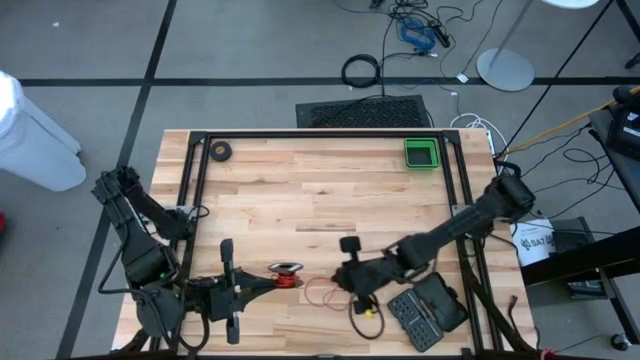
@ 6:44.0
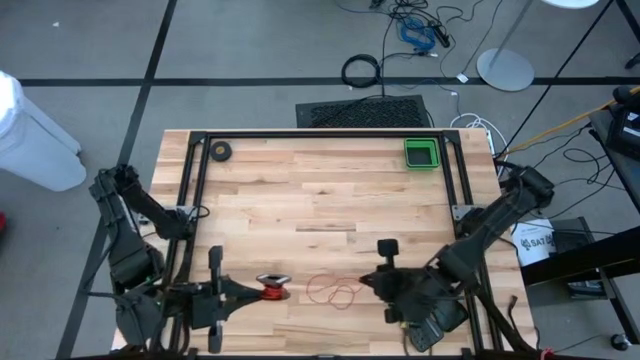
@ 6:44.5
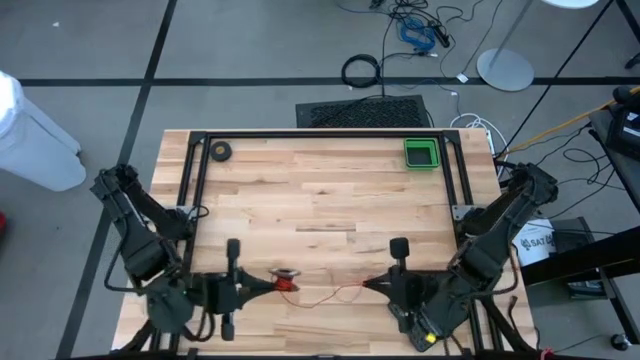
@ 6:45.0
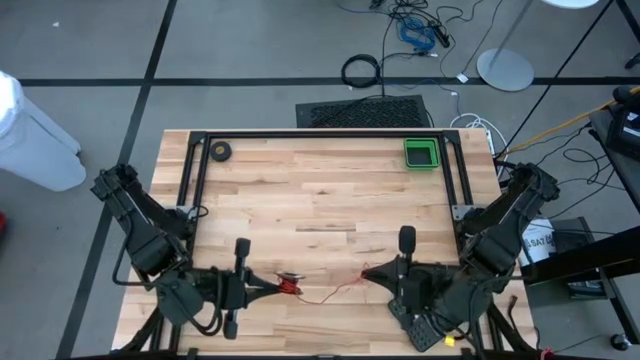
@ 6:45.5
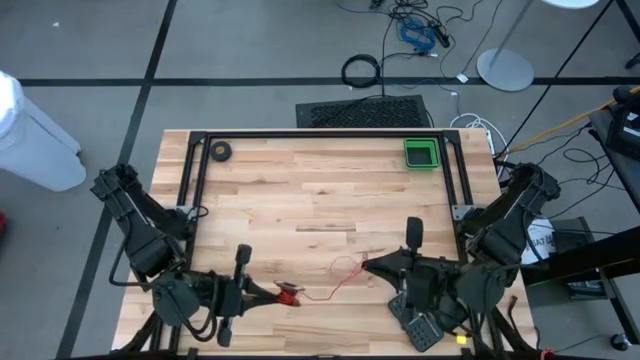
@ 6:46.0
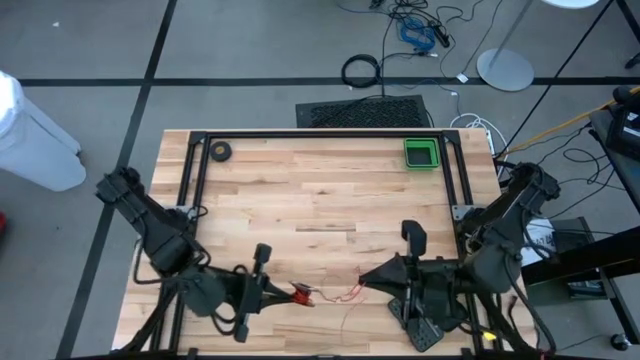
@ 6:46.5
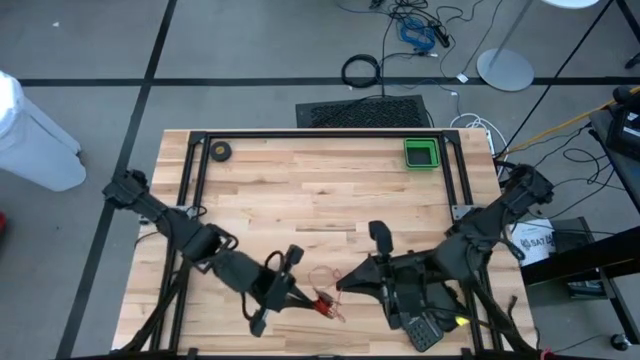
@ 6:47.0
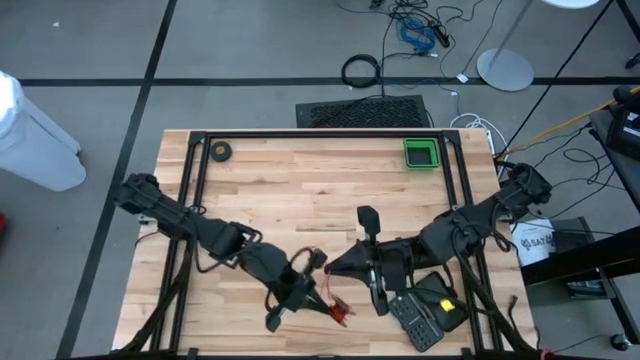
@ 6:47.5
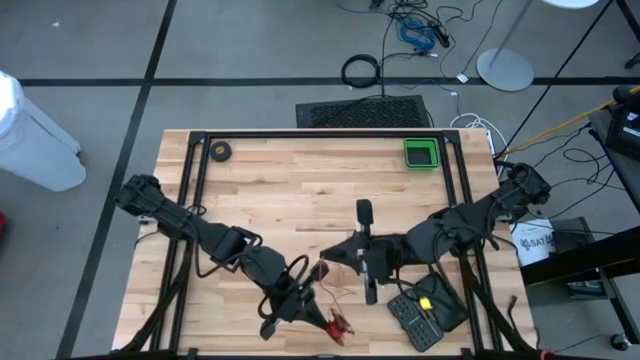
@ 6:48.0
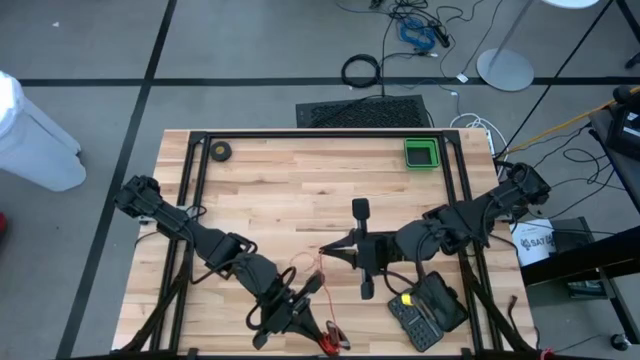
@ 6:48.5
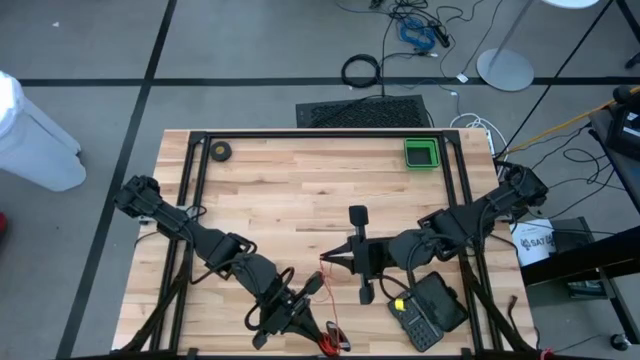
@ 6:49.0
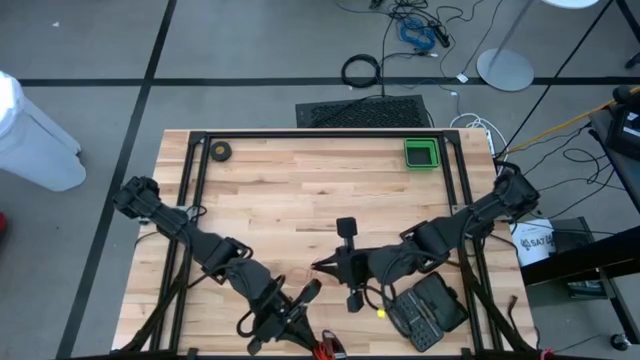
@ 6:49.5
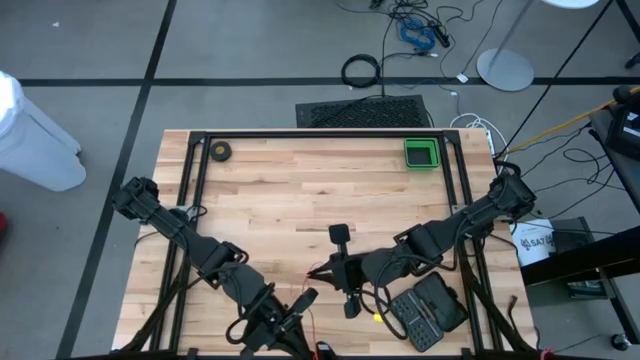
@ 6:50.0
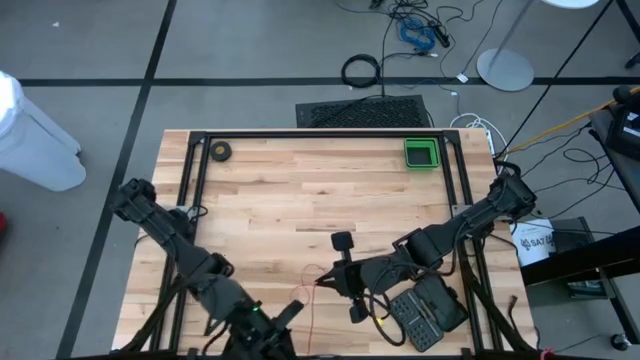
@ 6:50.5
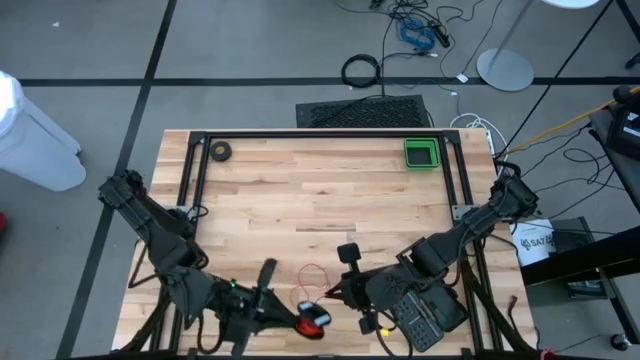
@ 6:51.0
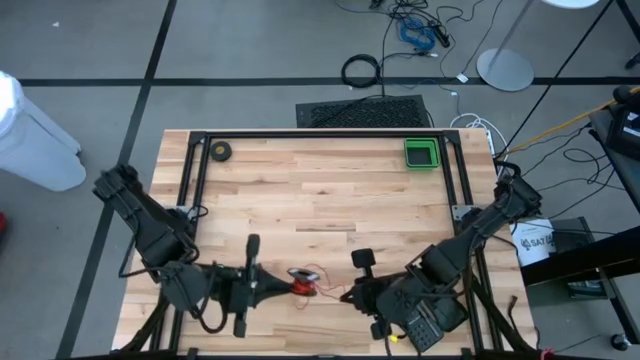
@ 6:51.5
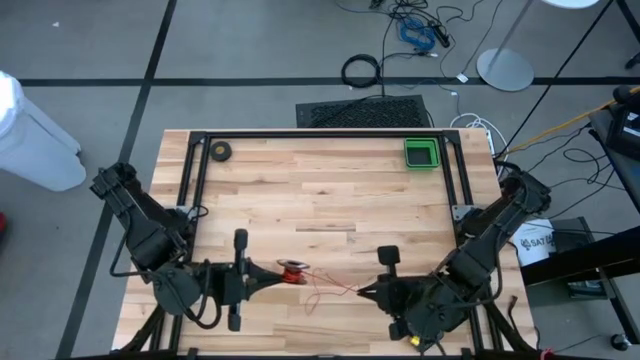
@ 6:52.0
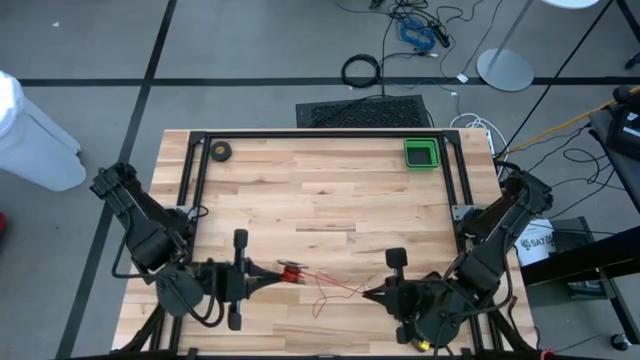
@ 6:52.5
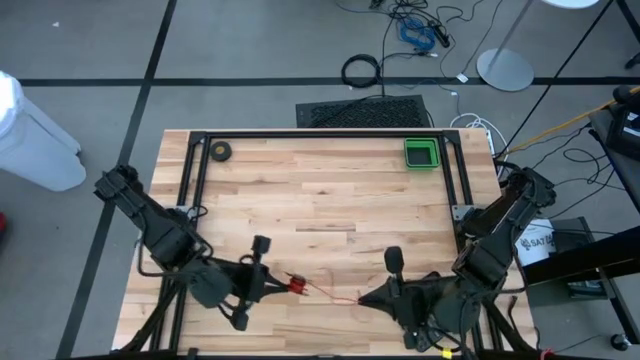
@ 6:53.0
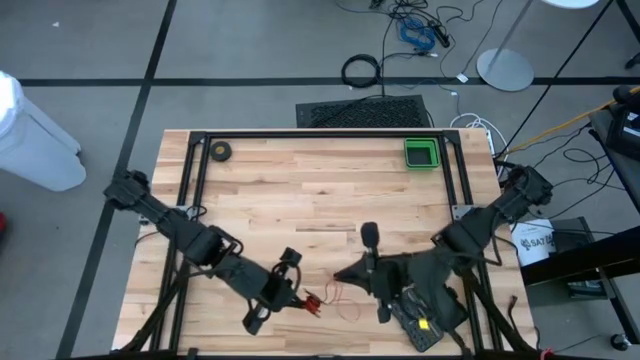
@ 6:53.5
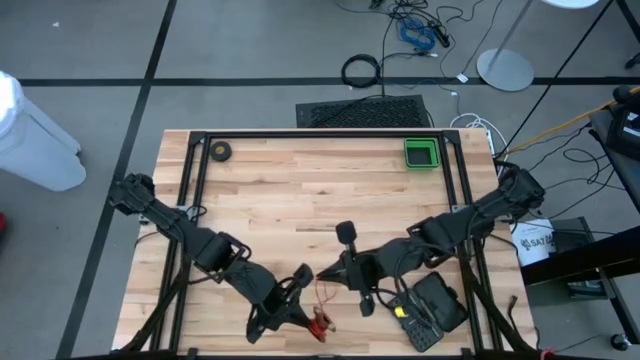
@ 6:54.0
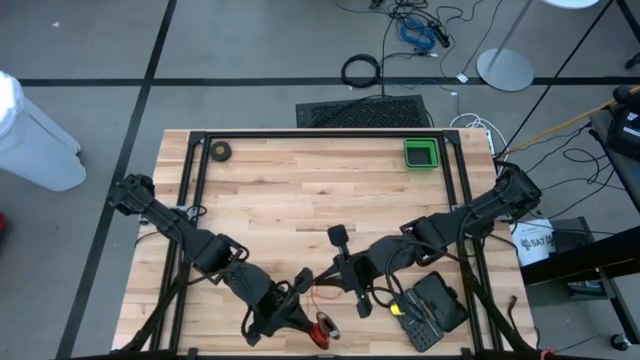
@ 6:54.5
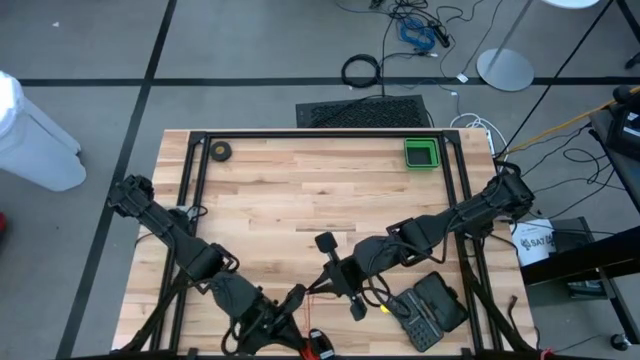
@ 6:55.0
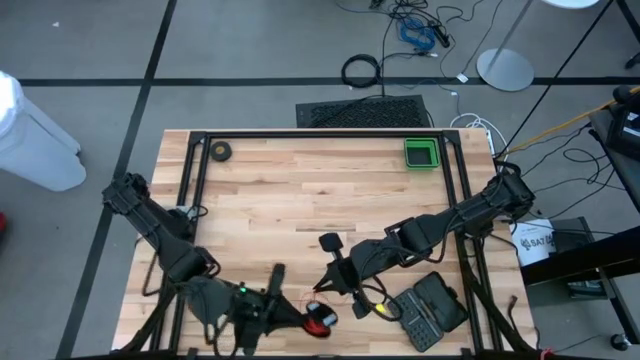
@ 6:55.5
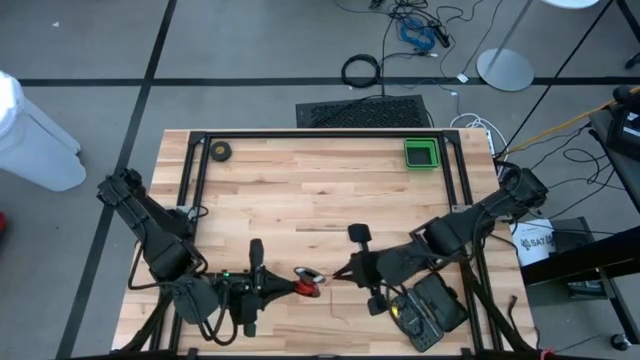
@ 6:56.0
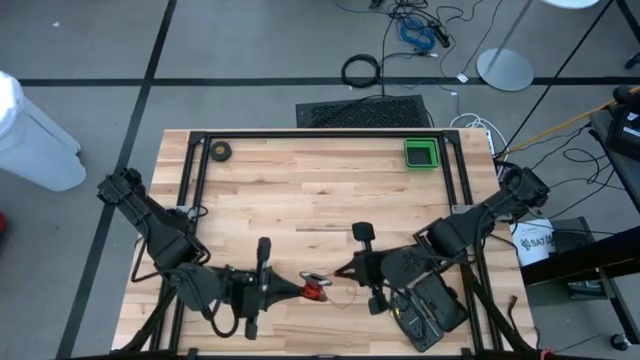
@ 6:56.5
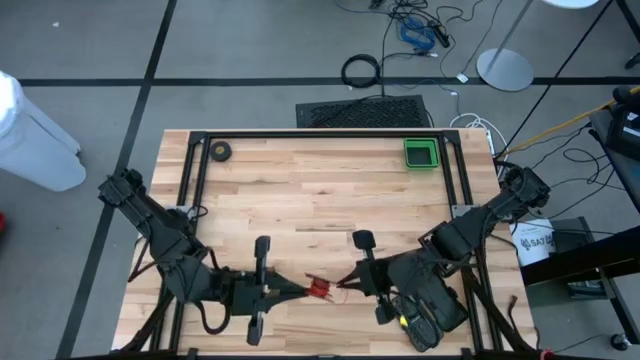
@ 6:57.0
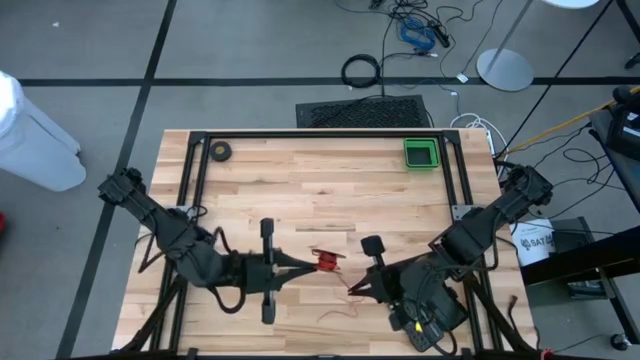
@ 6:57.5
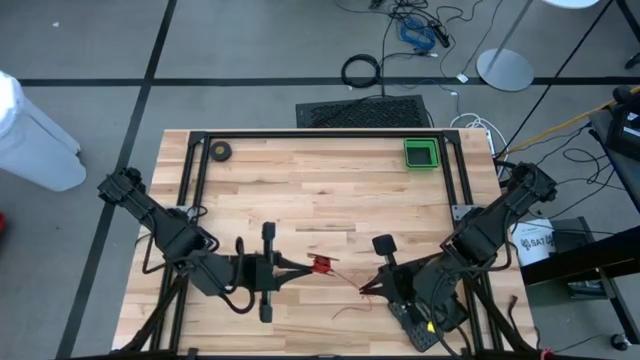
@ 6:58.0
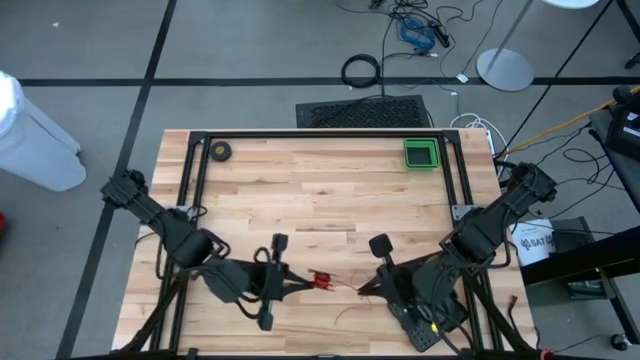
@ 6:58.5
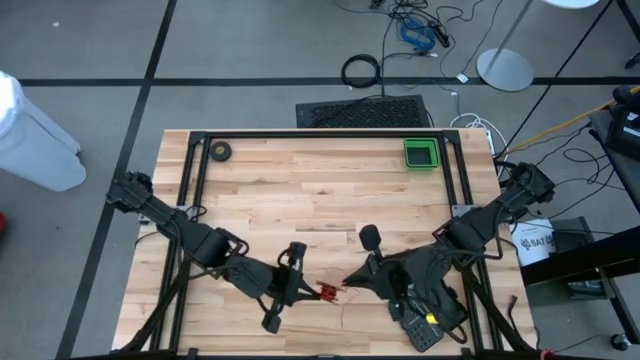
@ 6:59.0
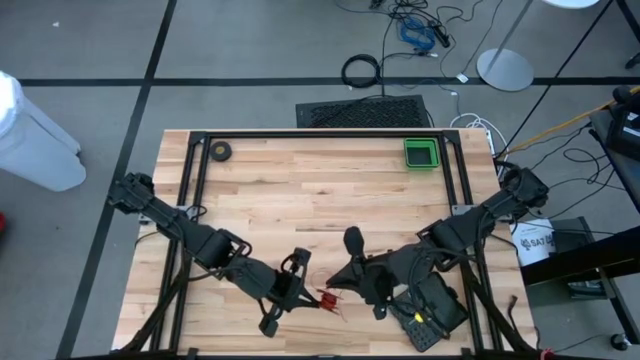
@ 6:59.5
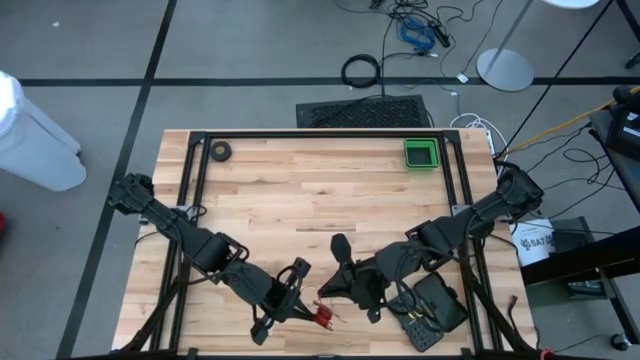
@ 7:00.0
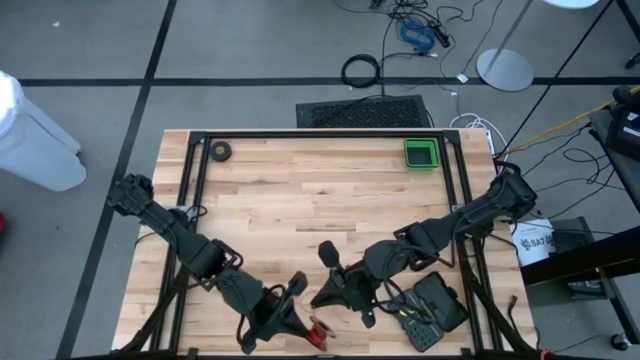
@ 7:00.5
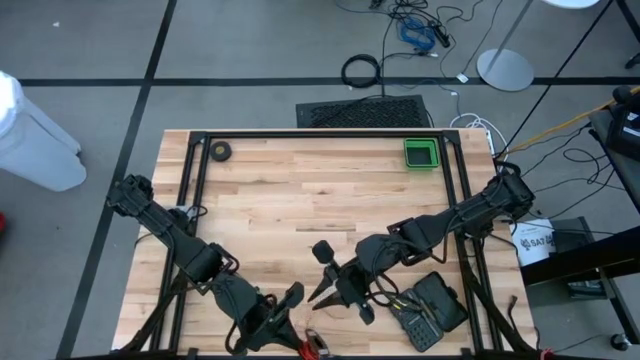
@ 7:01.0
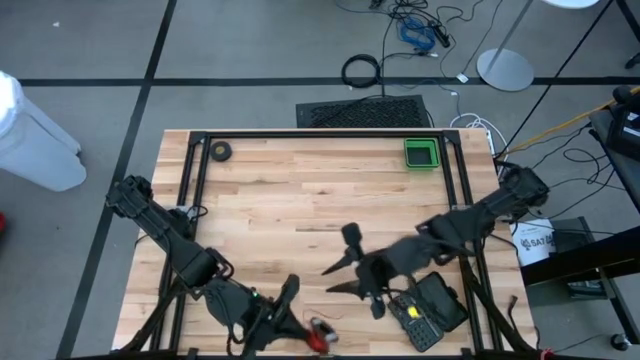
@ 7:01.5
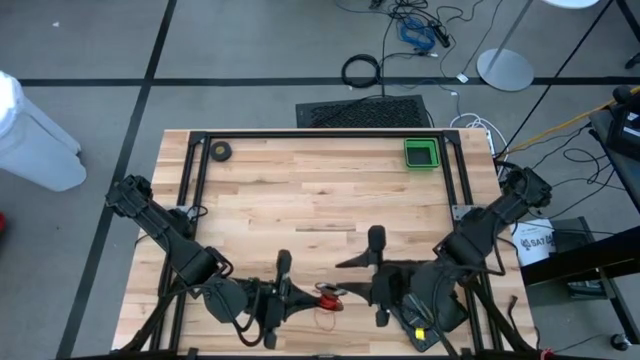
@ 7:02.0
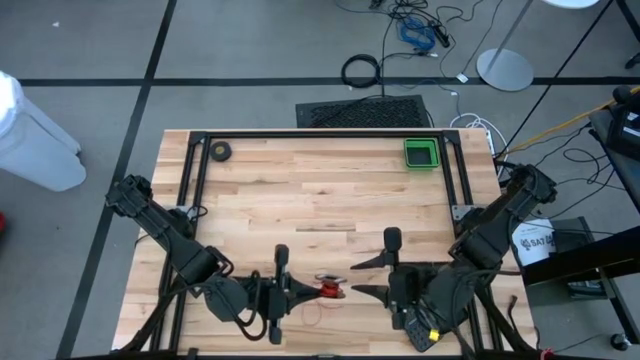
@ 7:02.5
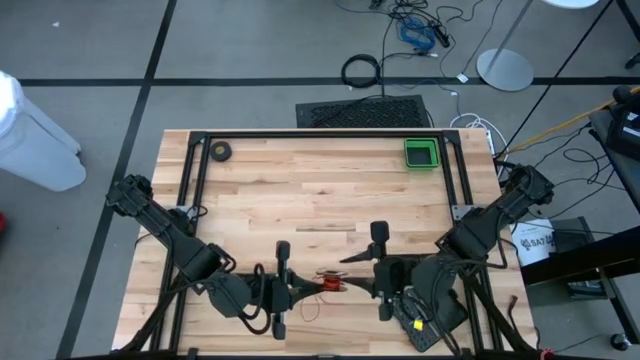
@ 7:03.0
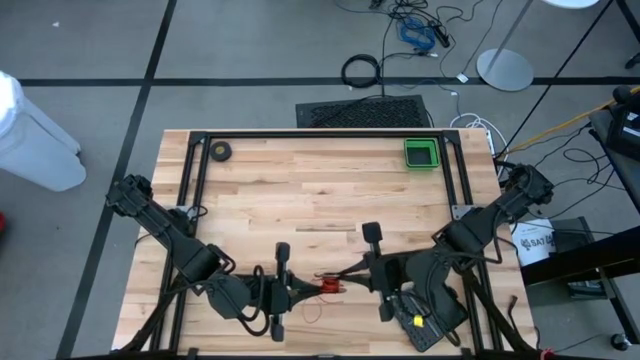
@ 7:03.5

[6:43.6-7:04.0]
Task: Coil cords
Coil the red wire into the spool
